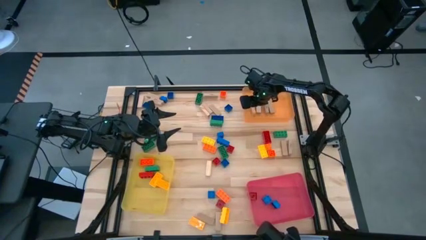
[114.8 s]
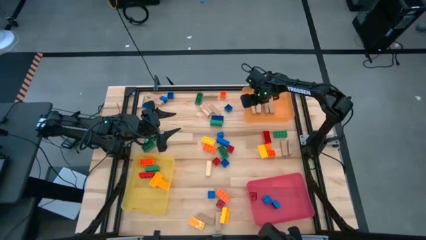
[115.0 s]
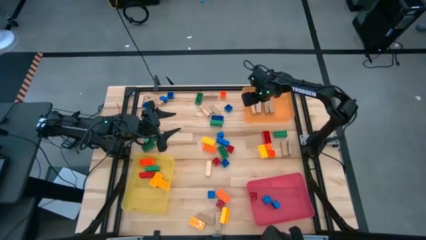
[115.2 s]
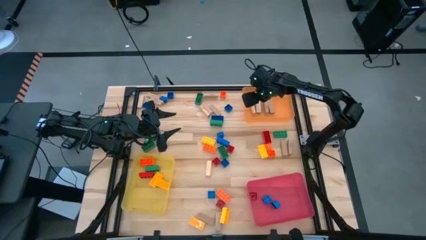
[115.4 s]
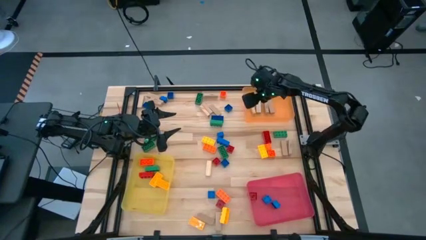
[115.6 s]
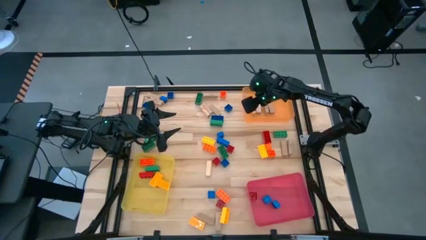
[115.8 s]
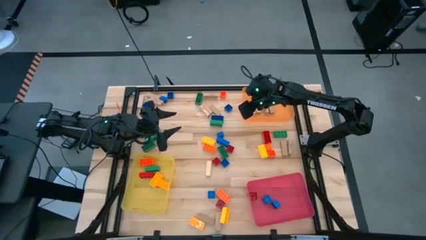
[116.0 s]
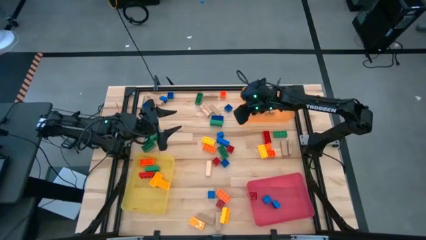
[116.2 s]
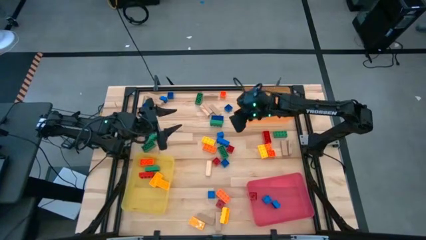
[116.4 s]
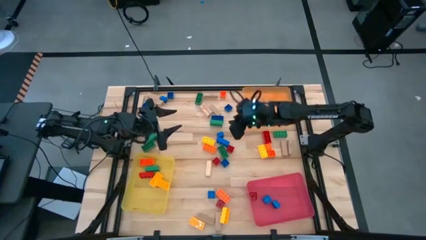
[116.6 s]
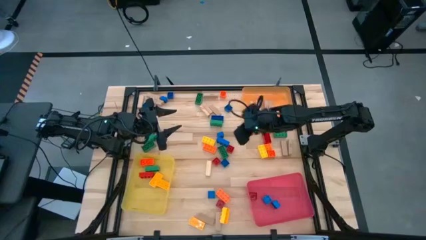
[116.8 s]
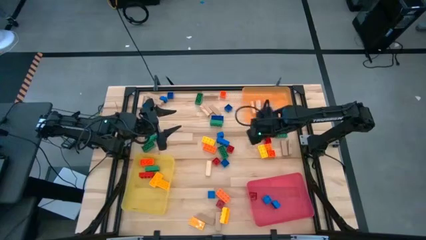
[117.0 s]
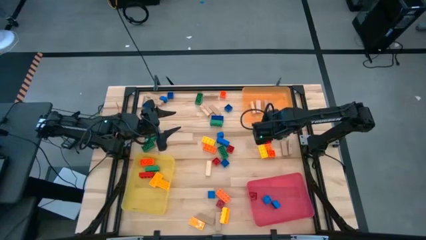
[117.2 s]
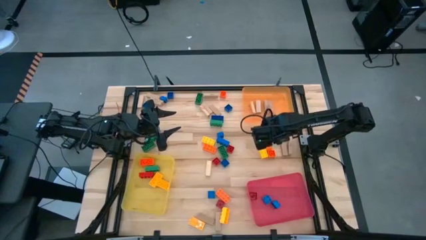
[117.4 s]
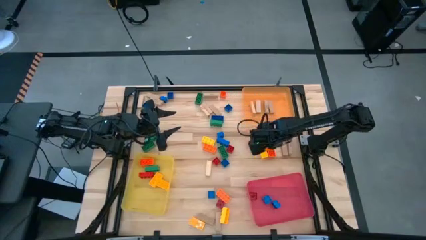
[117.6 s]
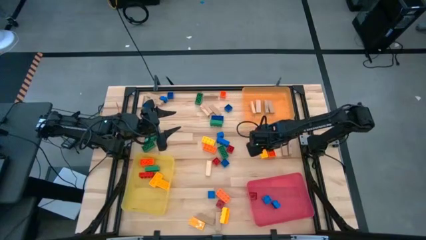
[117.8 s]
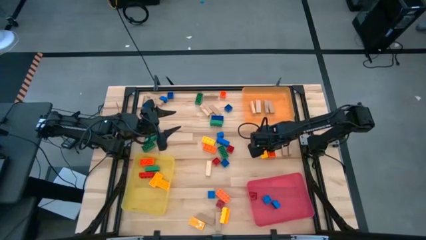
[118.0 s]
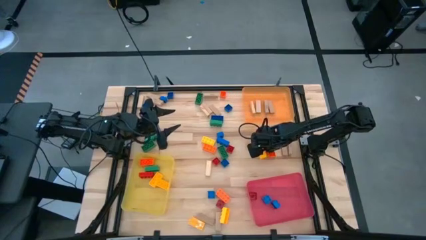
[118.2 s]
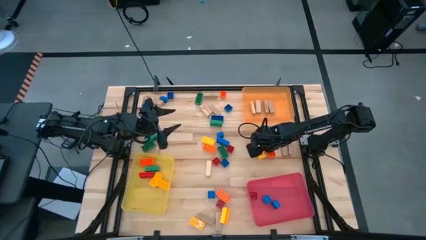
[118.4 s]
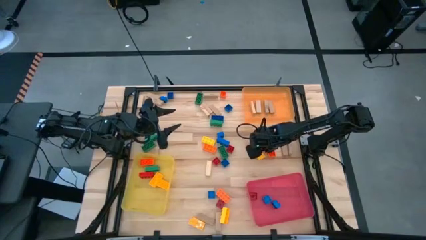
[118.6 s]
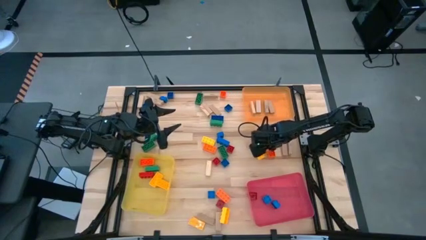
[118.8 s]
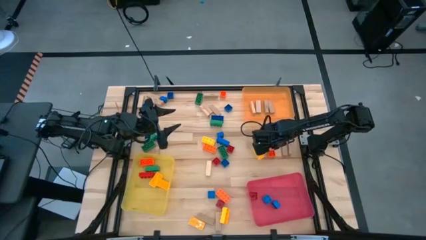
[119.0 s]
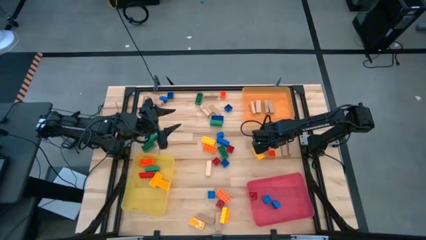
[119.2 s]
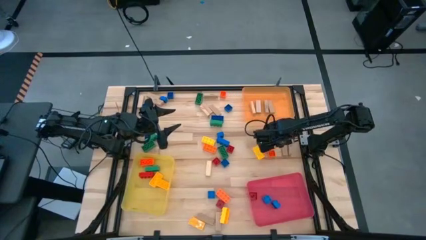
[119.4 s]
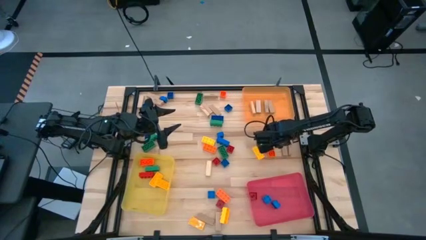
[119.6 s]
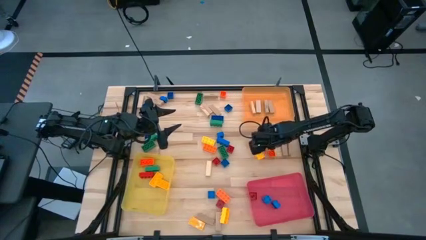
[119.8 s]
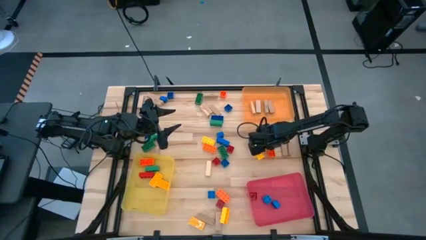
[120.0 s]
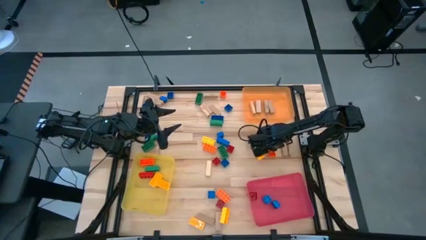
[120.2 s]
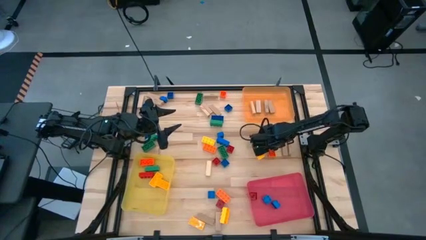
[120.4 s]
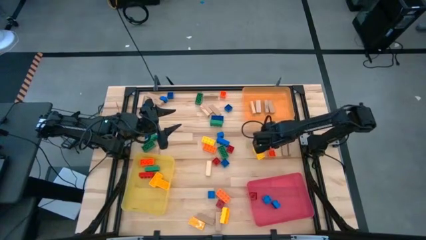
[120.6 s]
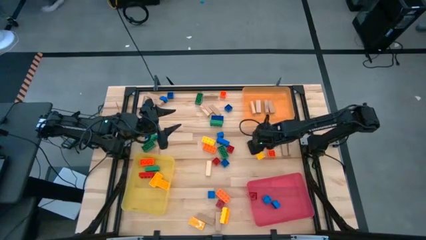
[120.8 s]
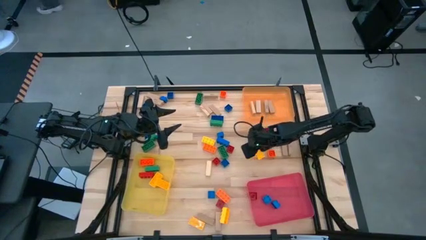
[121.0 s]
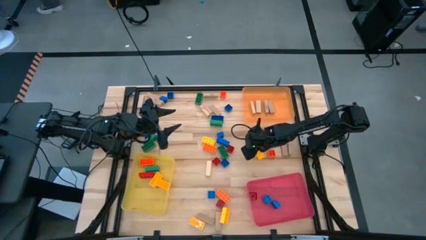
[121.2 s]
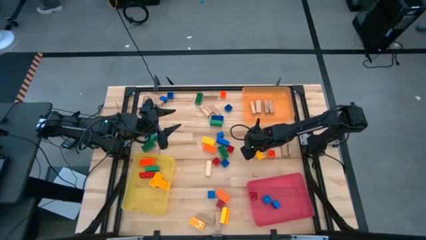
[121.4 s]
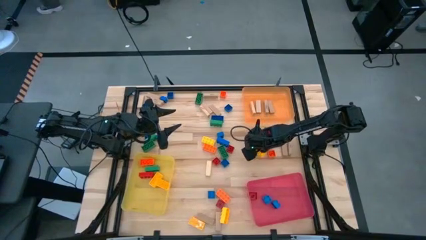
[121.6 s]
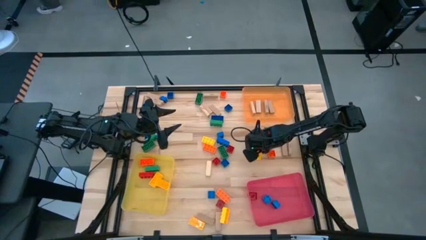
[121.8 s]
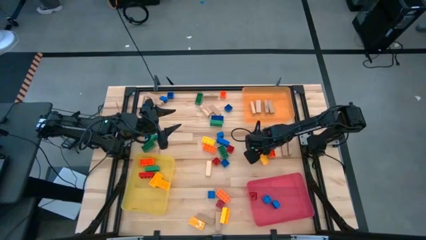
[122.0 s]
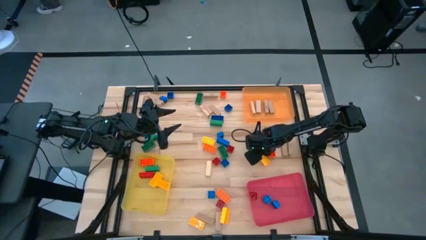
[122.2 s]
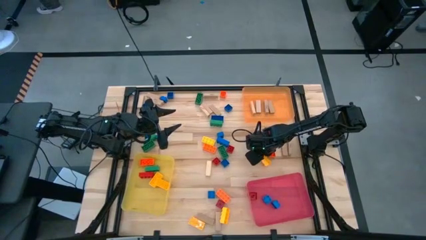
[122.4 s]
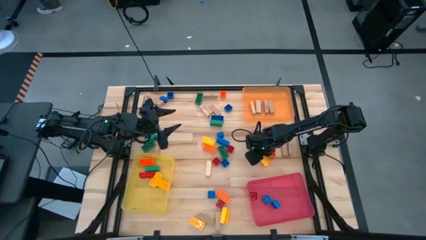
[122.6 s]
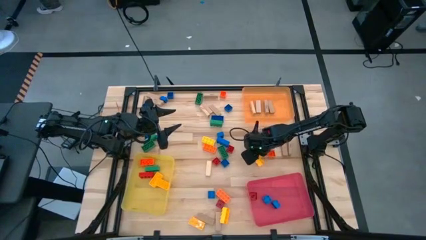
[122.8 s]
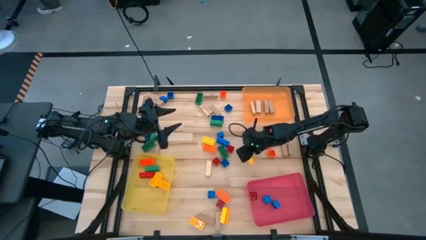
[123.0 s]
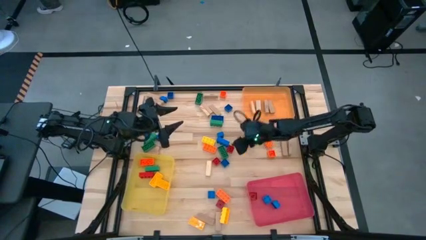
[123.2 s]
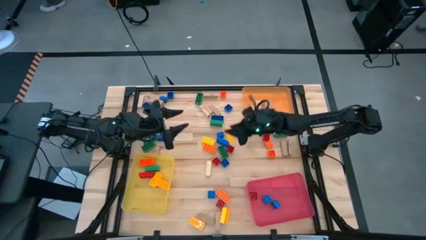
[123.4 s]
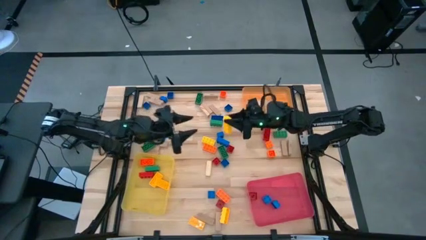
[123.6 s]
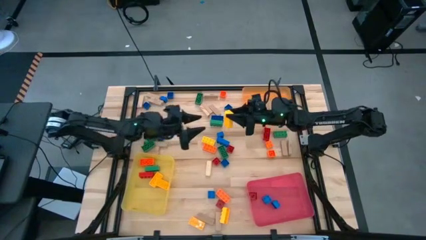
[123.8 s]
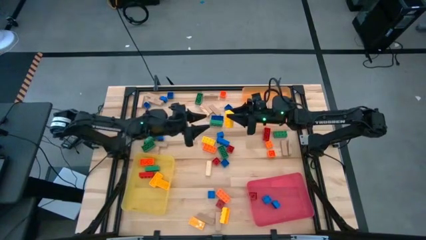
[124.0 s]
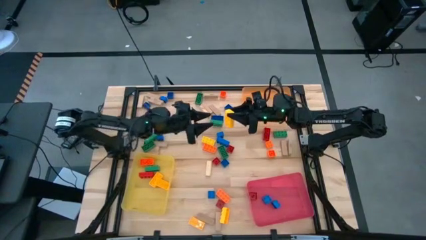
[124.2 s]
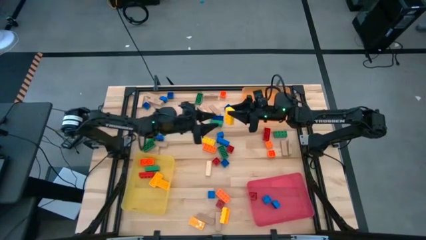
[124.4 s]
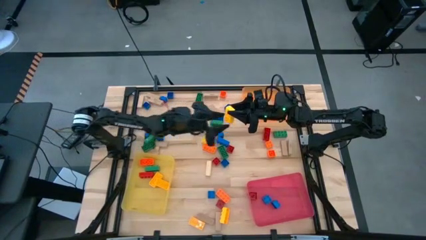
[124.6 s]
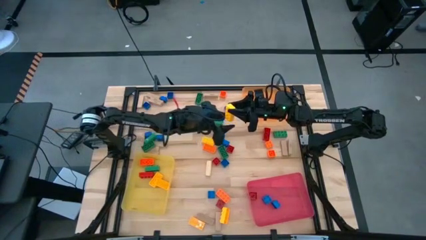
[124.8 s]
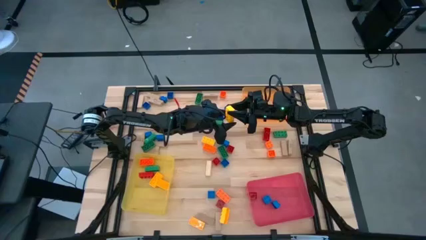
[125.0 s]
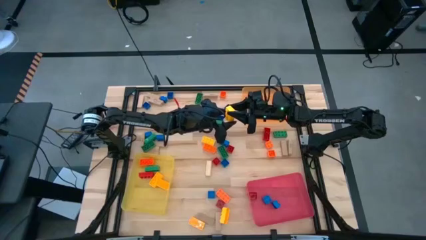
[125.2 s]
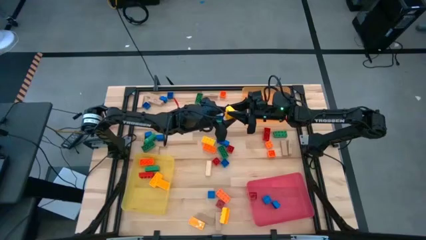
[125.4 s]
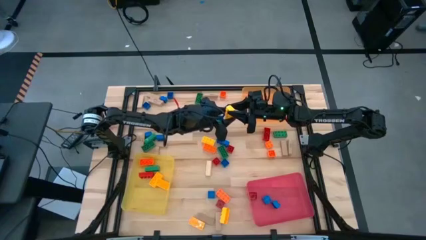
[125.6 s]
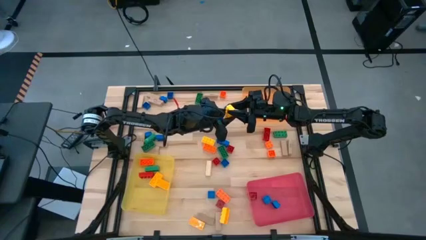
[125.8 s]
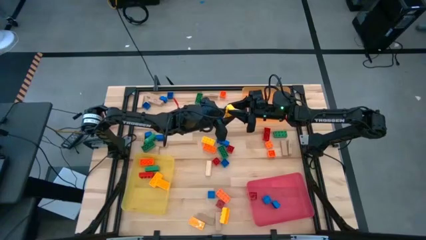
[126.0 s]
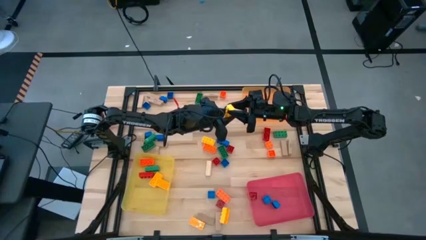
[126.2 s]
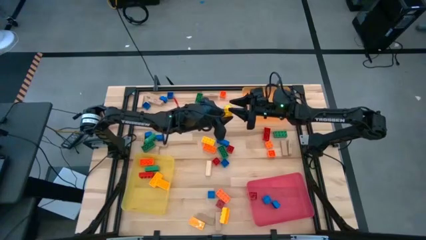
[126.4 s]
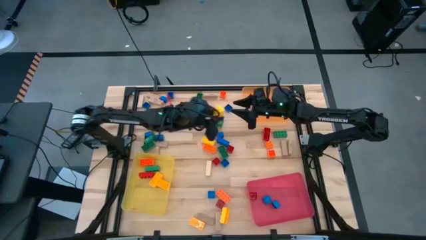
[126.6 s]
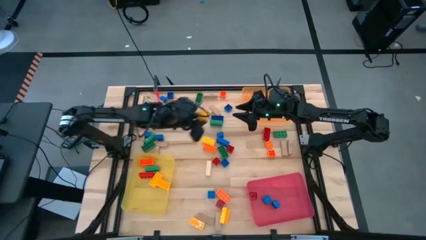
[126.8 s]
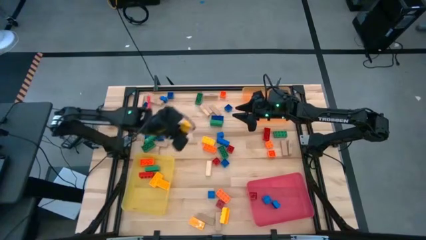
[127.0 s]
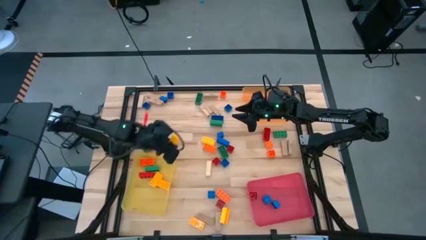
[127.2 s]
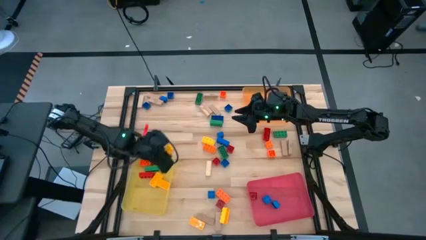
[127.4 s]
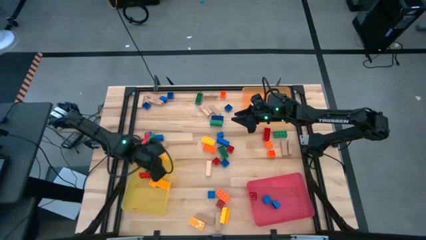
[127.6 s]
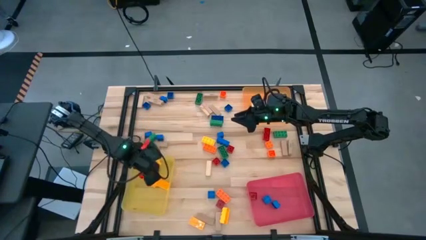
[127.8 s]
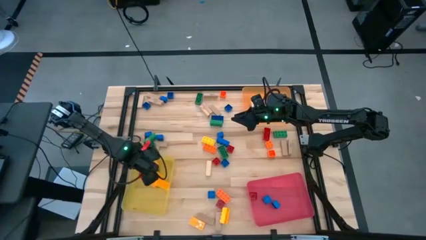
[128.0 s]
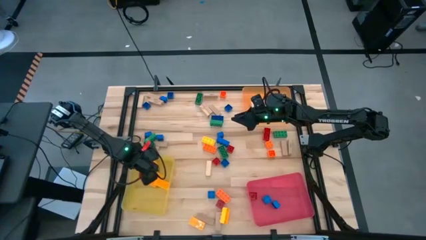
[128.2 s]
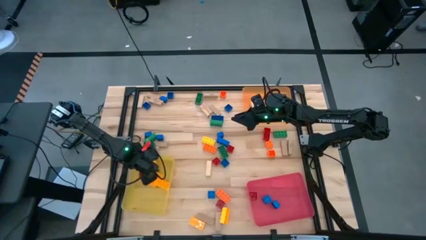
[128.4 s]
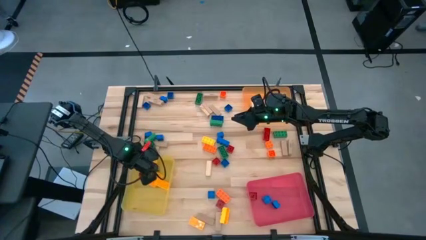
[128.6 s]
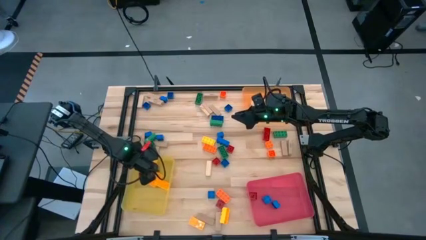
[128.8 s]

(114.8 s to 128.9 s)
Task: Sort blocks by size
Put the large yellow game piece into the yellow bin
